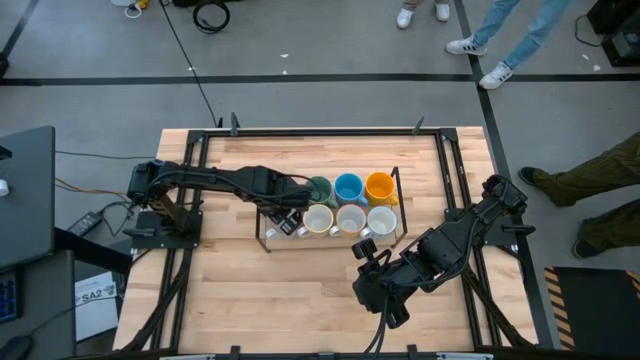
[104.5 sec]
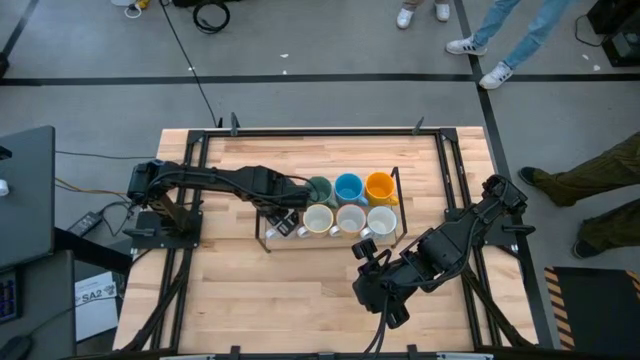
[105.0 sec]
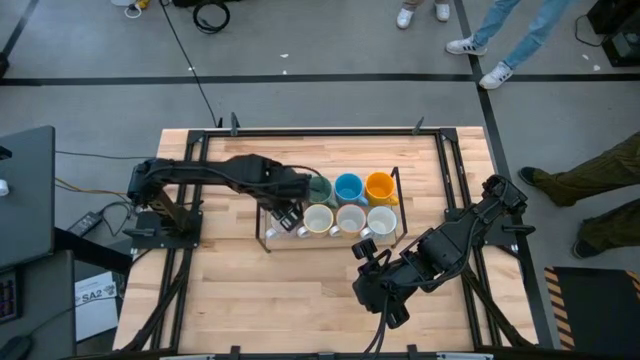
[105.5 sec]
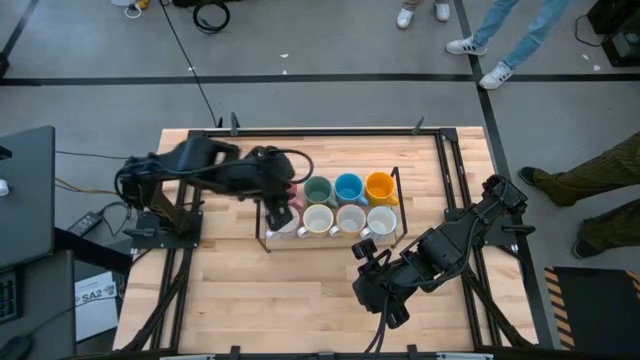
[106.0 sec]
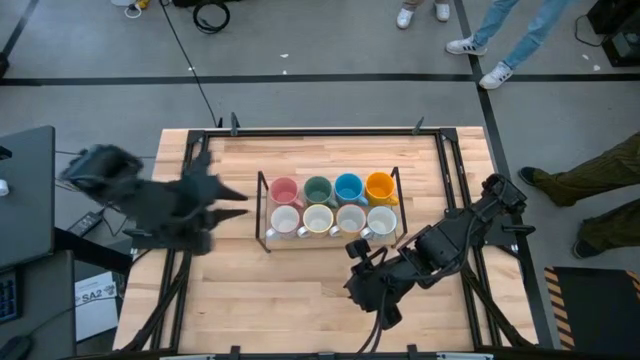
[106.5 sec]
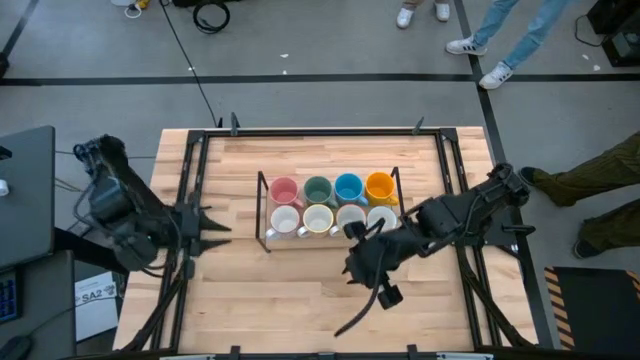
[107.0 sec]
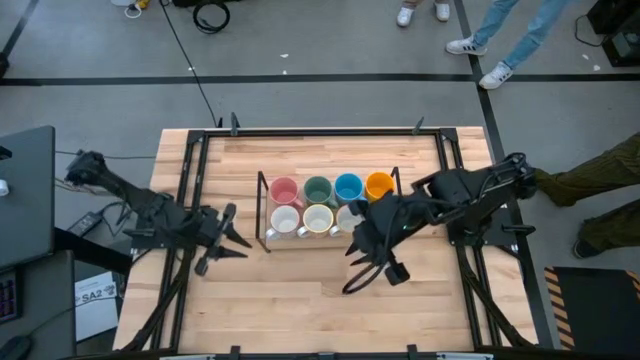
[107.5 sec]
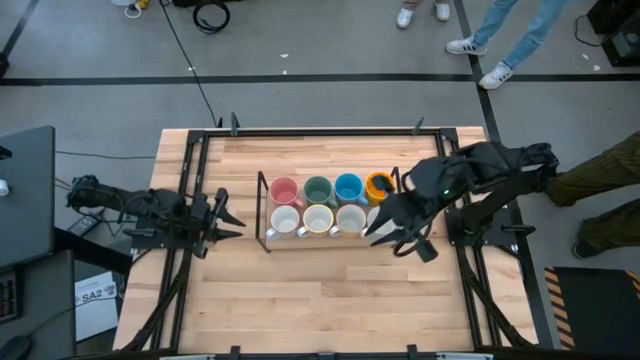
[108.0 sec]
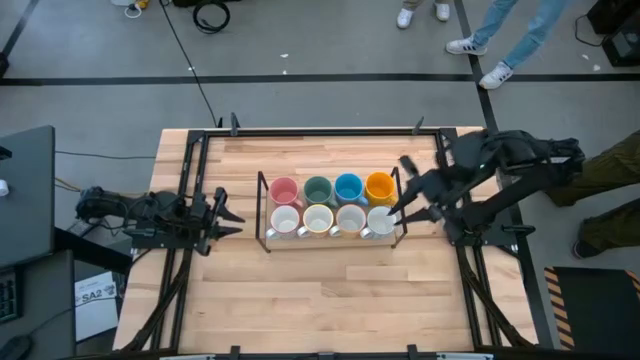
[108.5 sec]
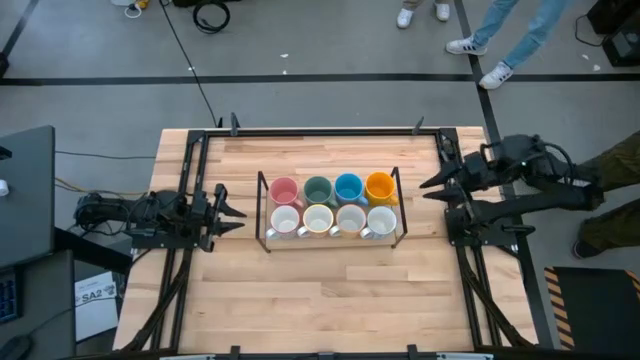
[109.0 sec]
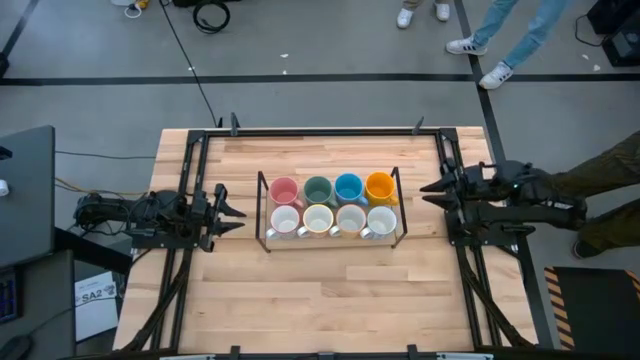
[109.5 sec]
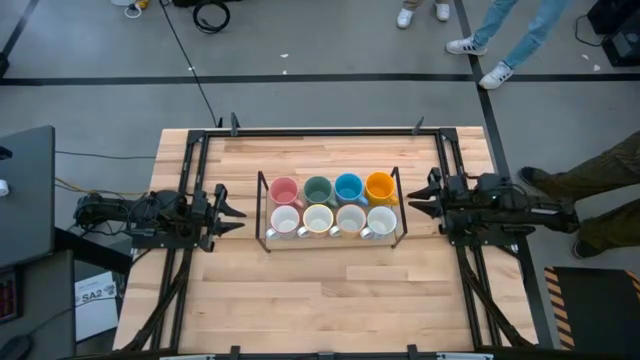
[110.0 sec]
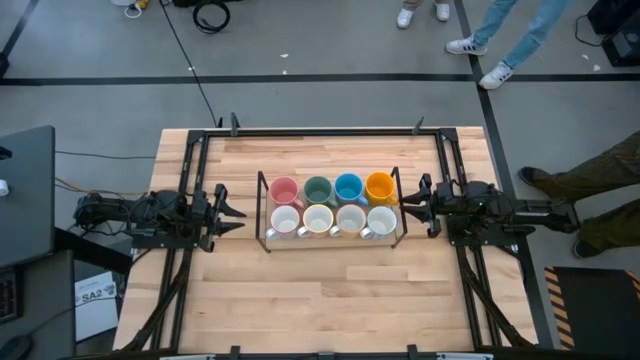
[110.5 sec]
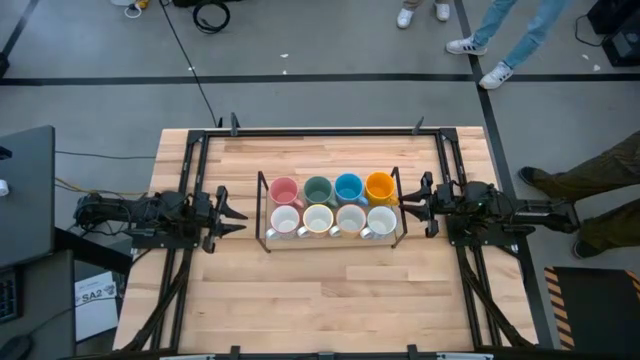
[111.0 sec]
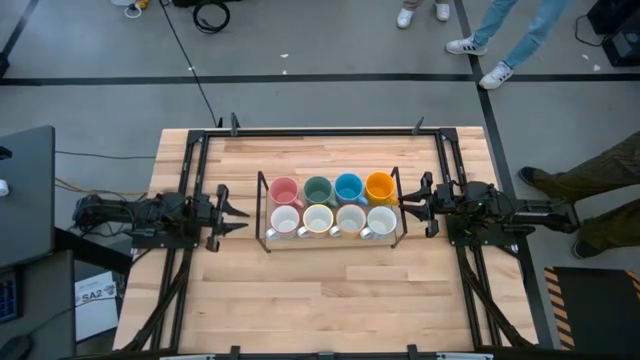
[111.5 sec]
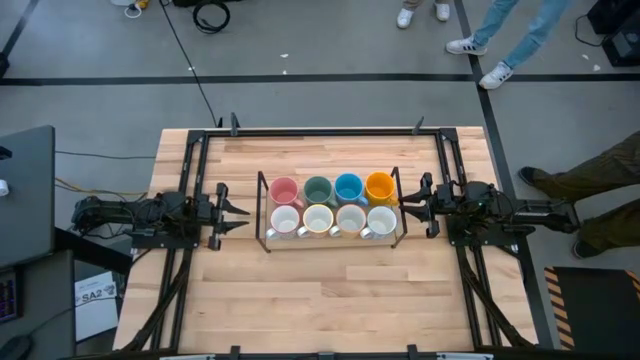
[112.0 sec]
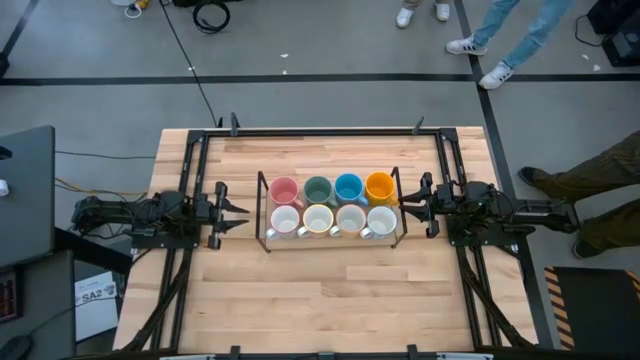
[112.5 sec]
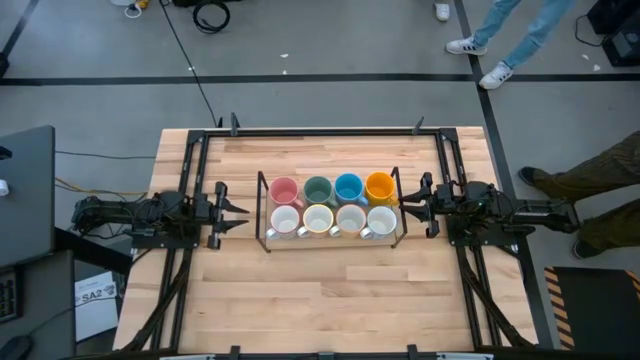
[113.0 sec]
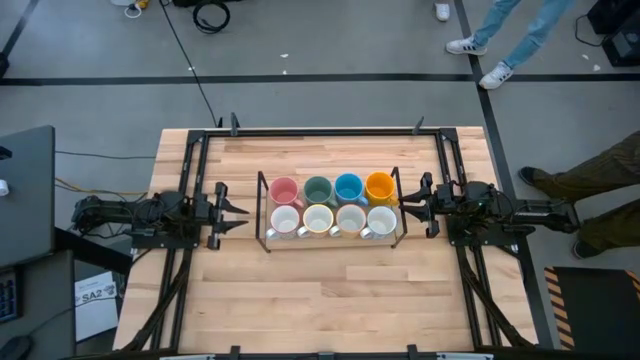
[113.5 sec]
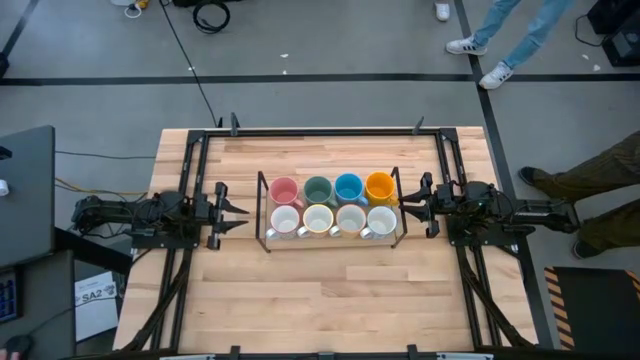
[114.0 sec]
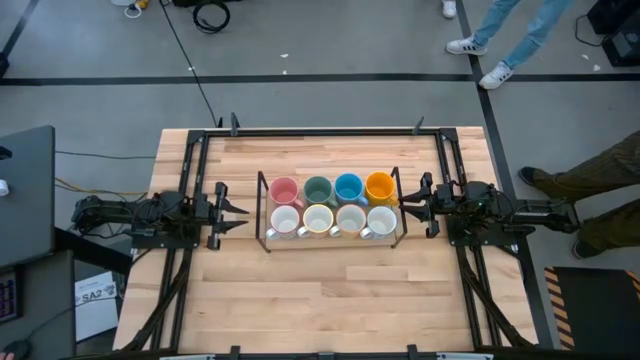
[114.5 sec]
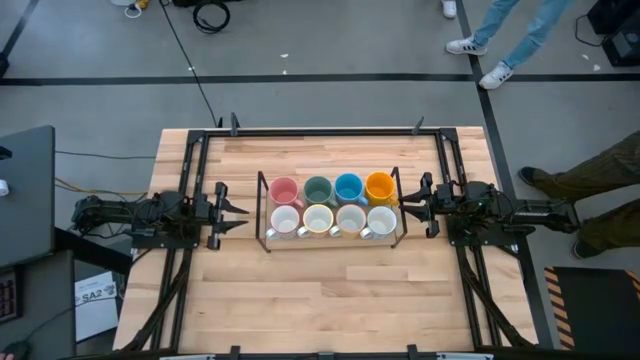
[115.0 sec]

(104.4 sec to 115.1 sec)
Task: Place coffee mugs
Return to Home Position

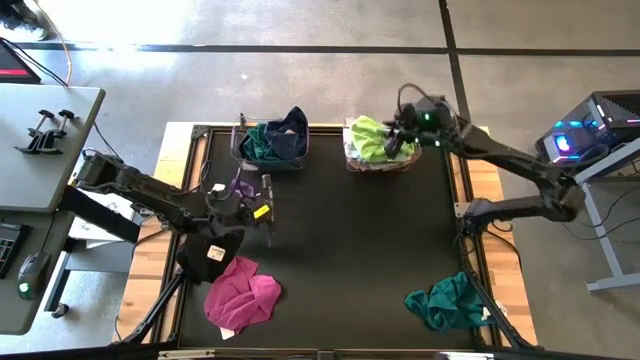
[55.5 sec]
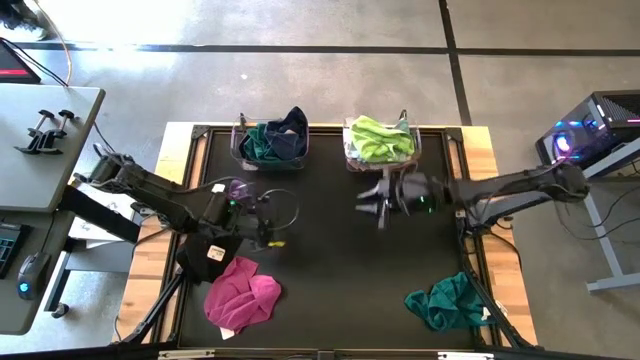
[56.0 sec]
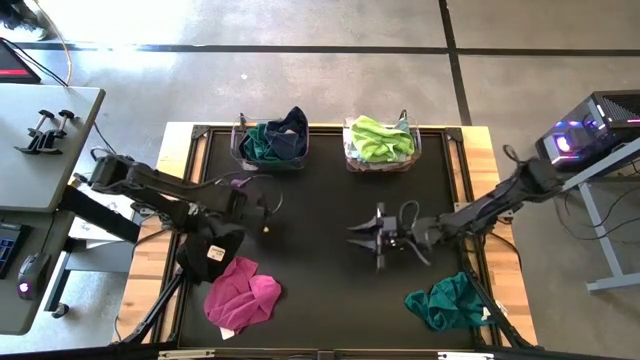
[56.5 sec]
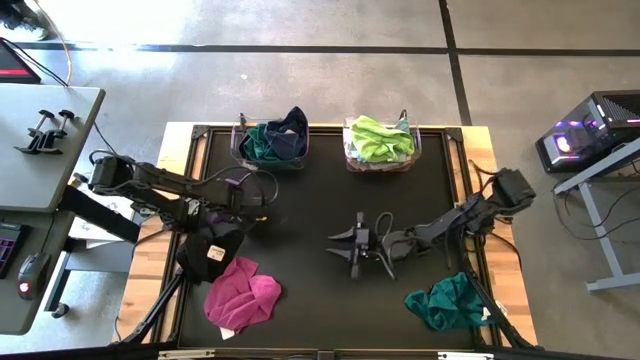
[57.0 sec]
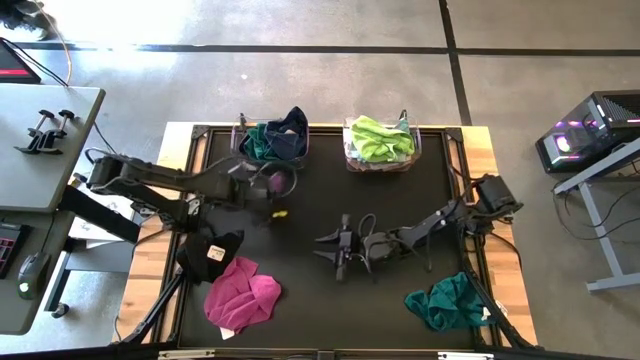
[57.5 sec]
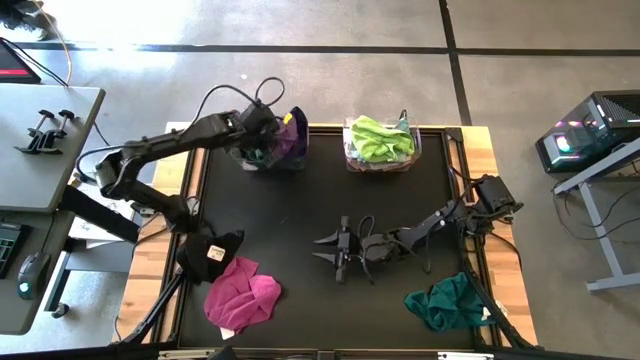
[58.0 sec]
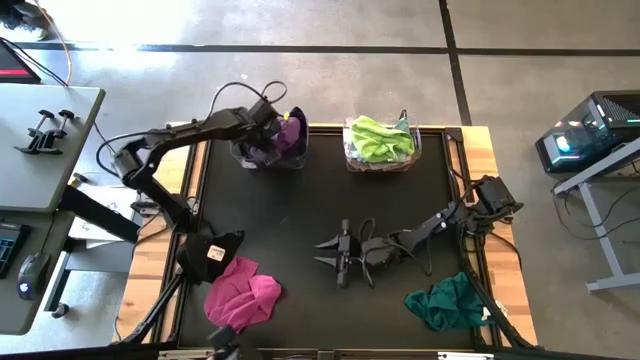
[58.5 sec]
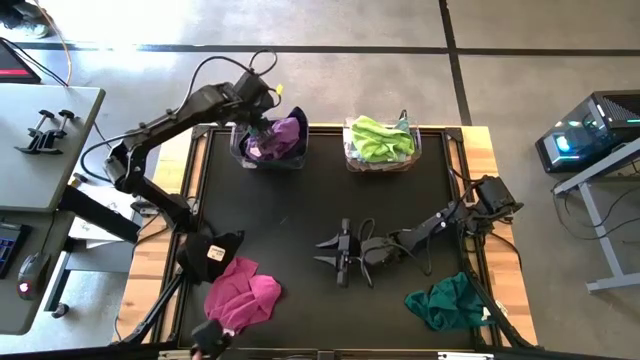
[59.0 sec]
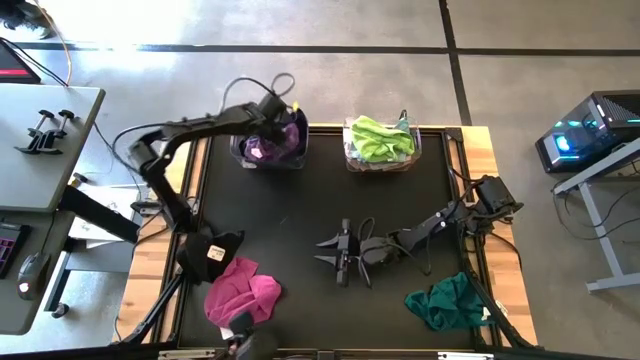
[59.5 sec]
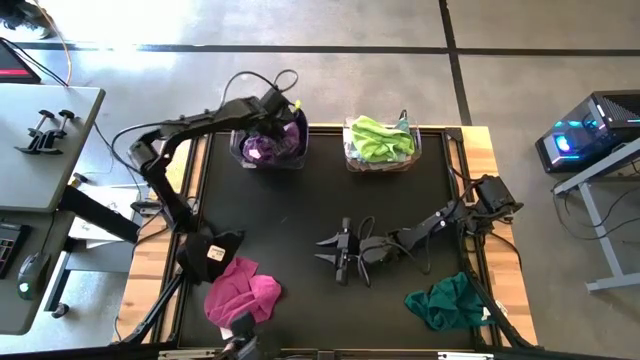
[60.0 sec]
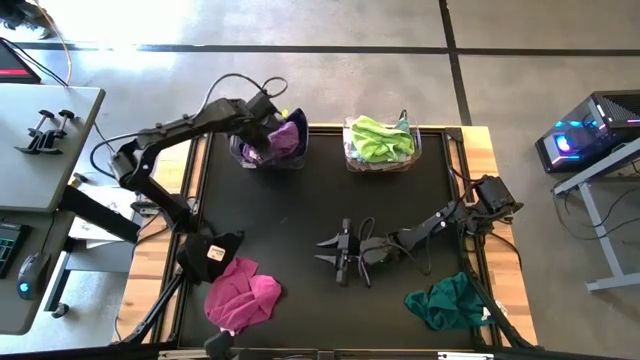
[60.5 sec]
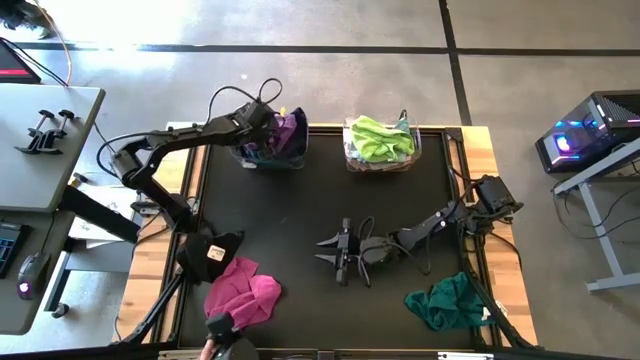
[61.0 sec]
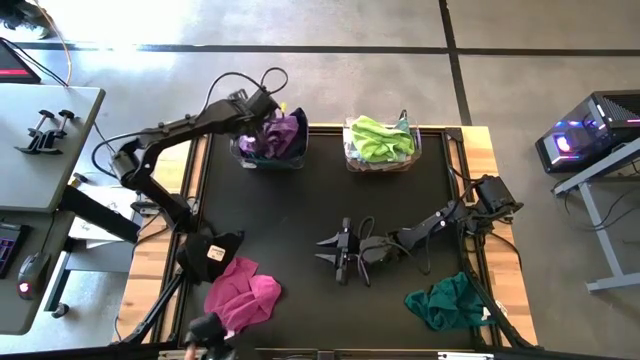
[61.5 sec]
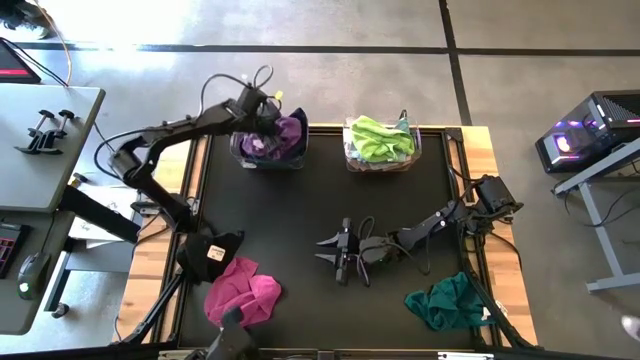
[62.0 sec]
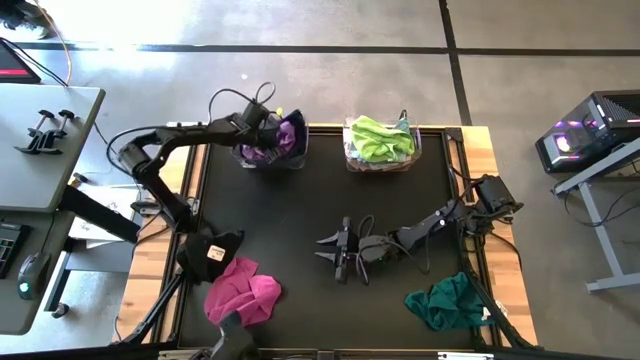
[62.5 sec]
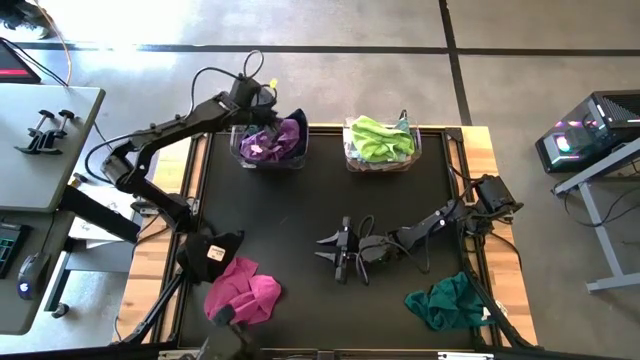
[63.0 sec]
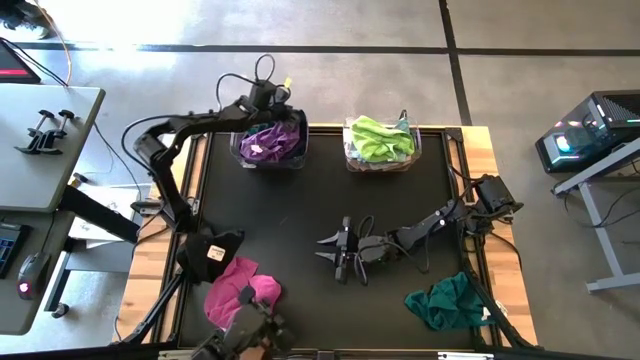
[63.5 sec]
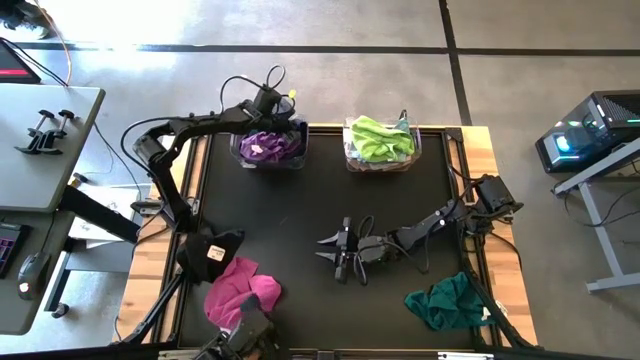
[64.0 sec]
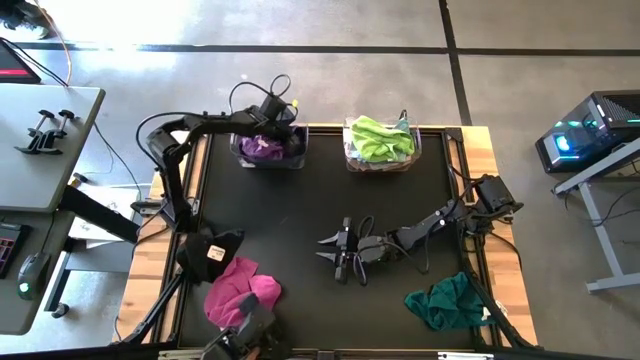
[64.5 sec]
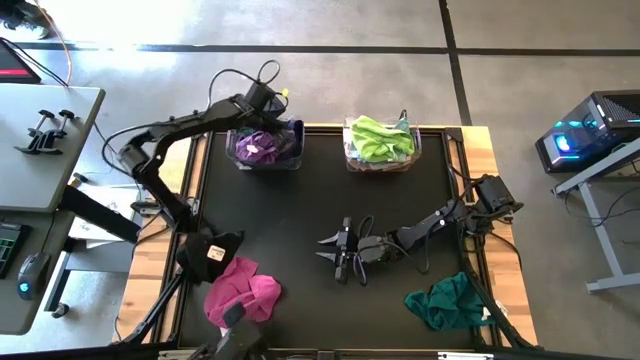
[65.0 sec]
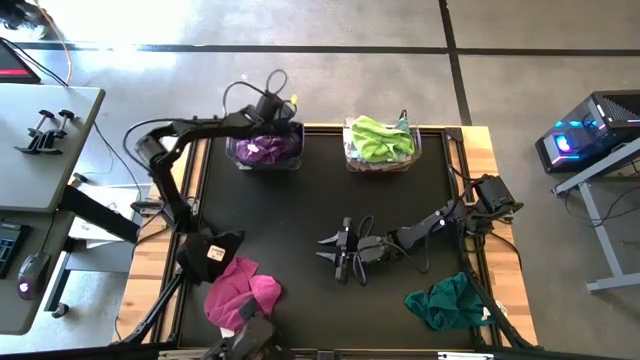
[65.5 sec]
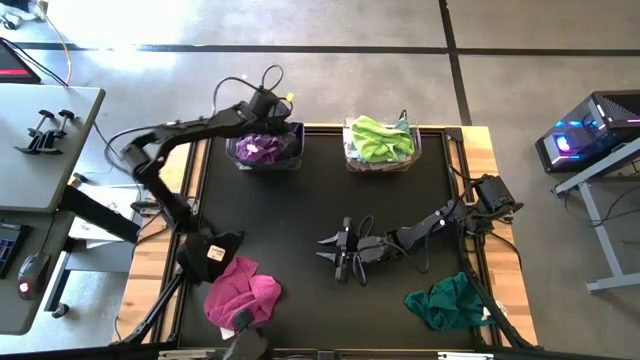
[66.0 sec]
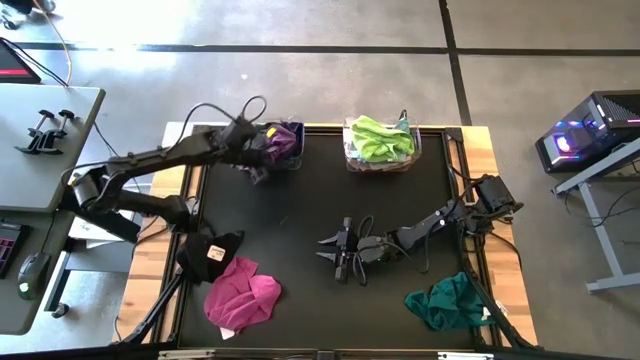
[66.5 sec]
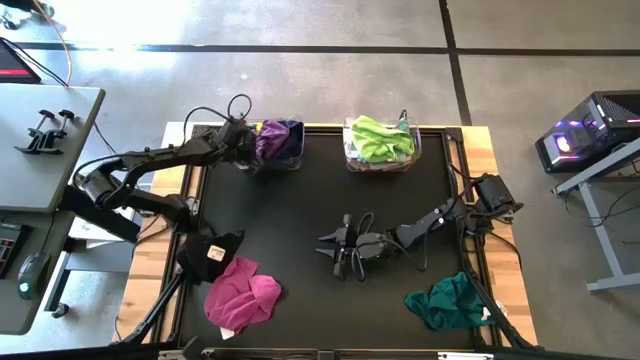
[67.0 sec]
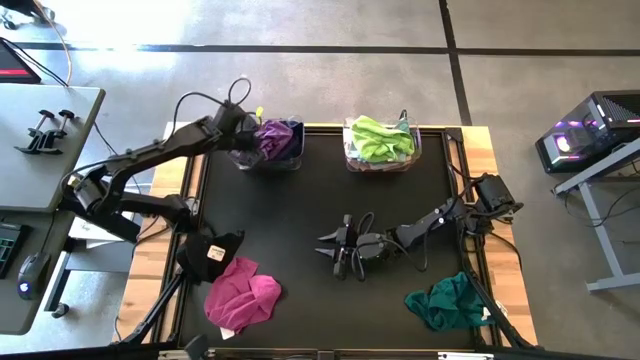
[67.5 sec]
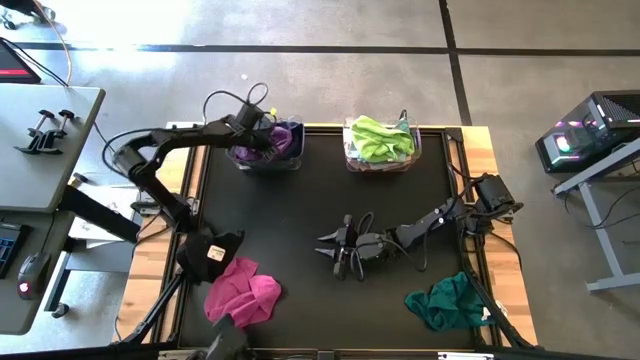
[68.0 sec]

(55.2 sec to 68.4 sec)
Task: Sort towels by color in basket
Put the violet microfiber towel into the left transparent bin
